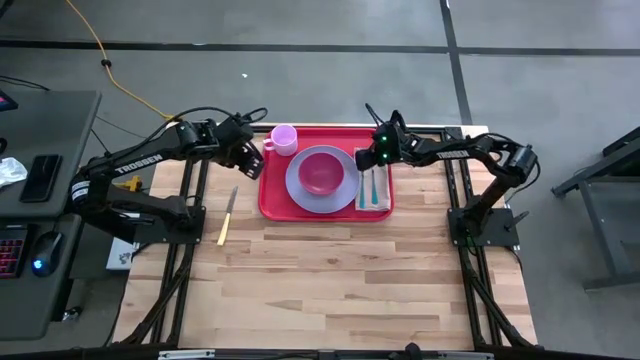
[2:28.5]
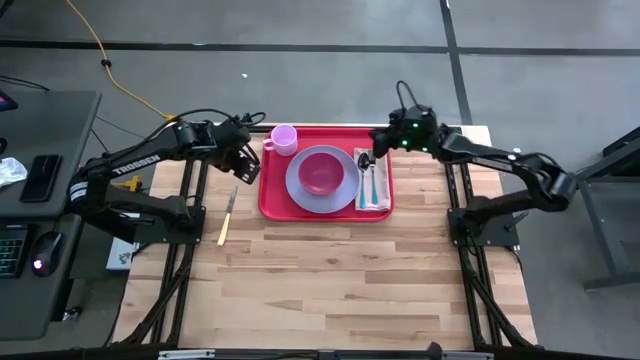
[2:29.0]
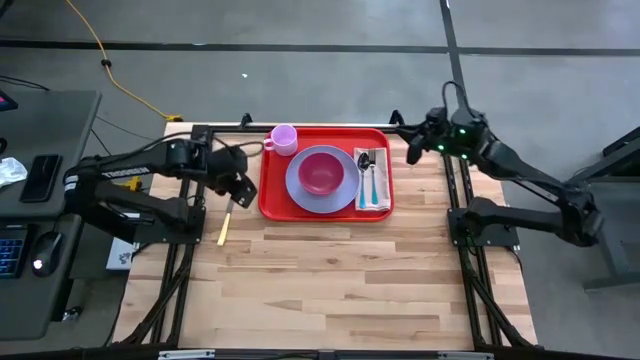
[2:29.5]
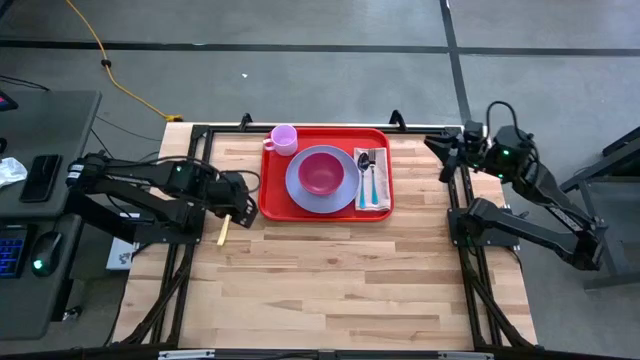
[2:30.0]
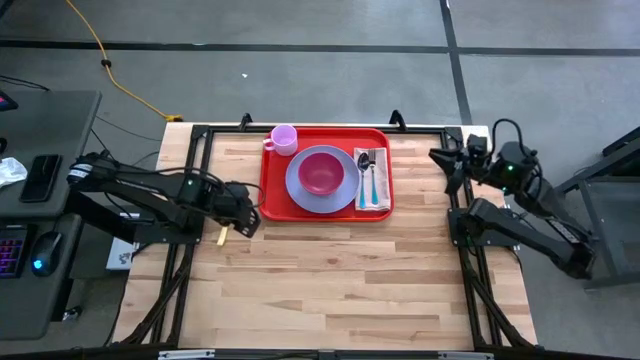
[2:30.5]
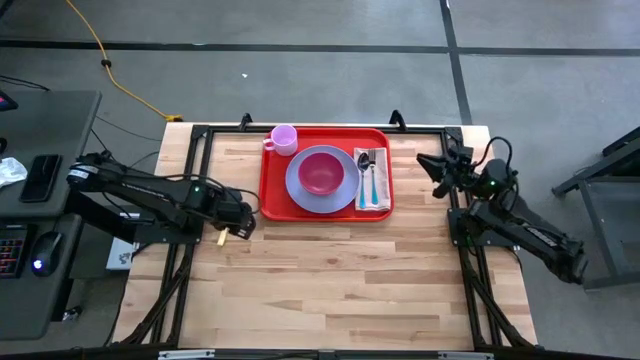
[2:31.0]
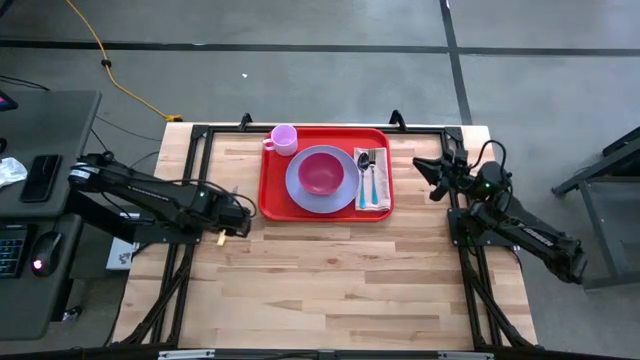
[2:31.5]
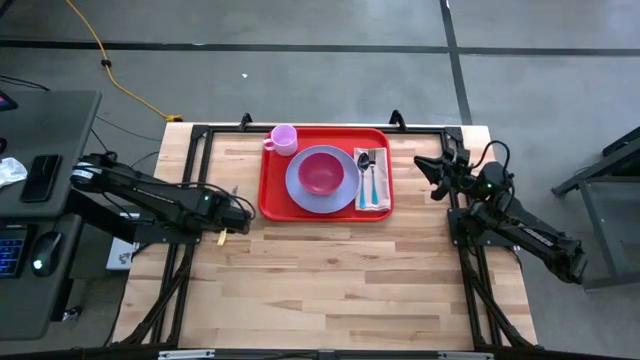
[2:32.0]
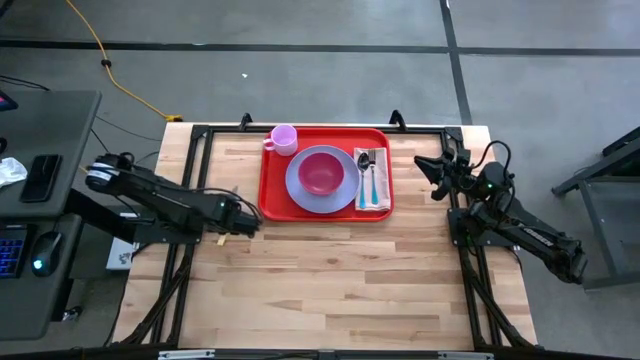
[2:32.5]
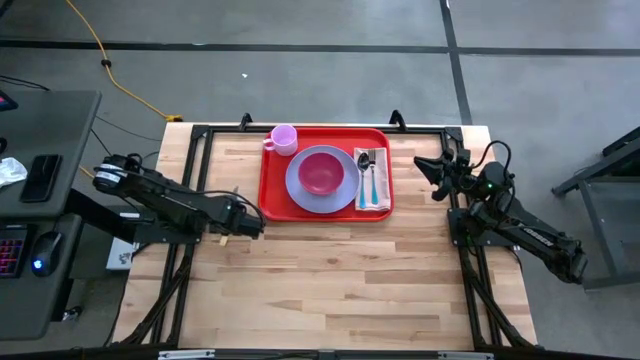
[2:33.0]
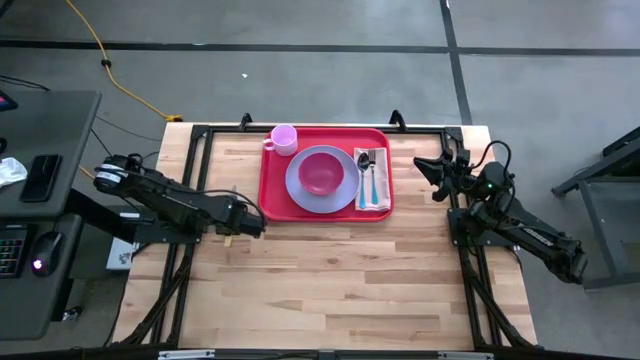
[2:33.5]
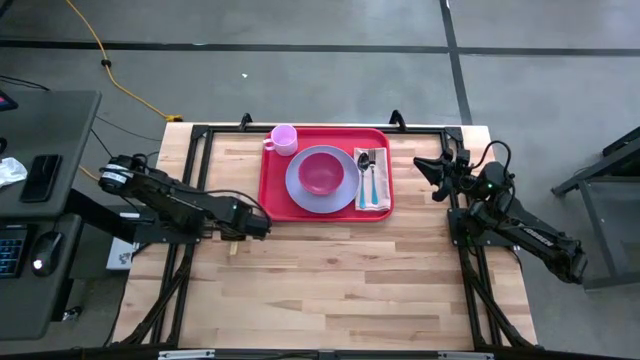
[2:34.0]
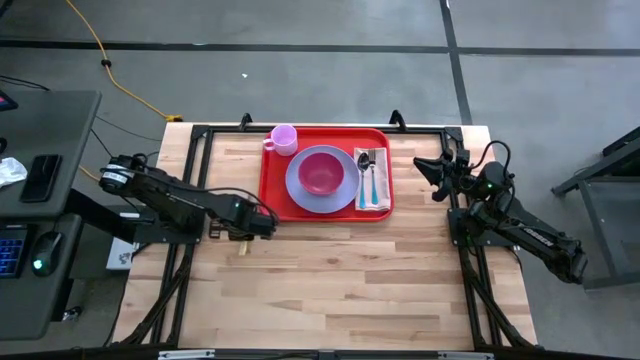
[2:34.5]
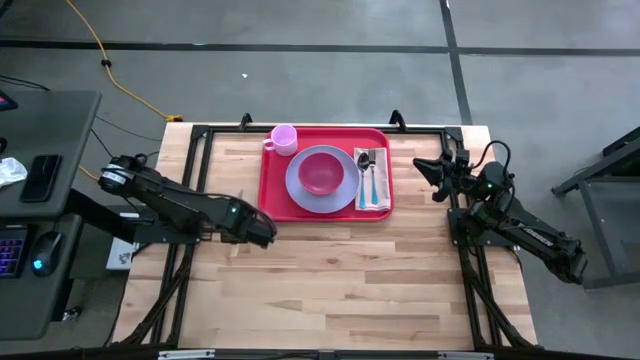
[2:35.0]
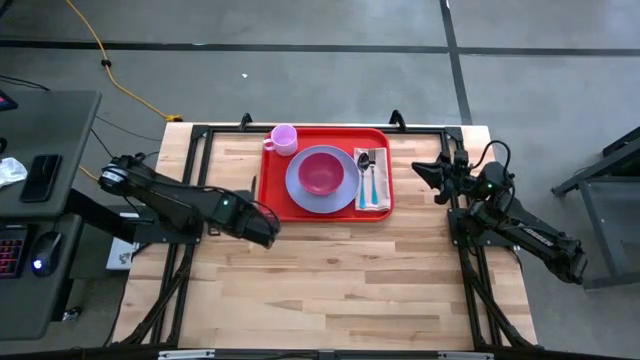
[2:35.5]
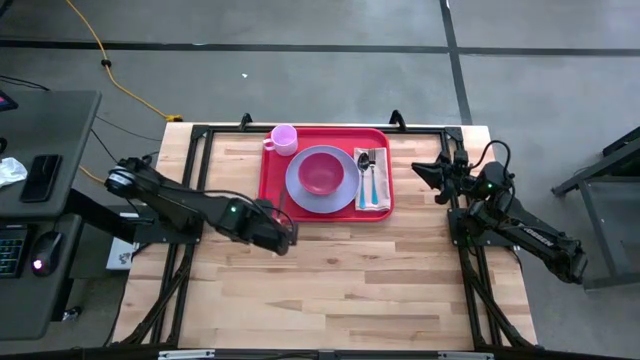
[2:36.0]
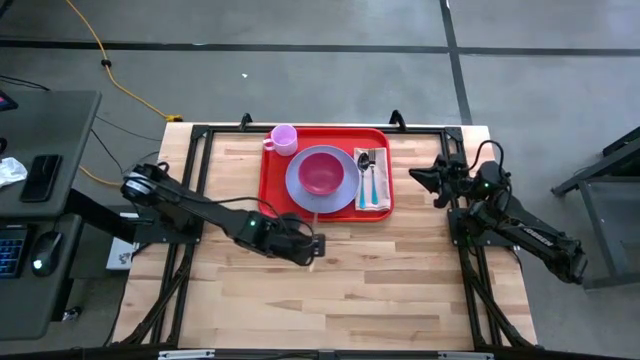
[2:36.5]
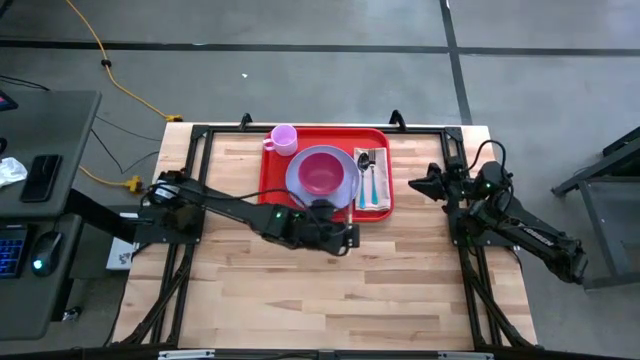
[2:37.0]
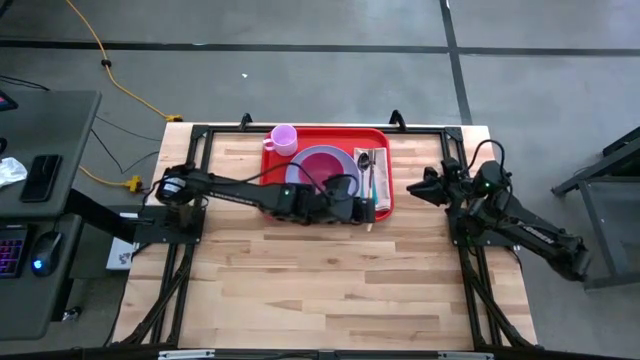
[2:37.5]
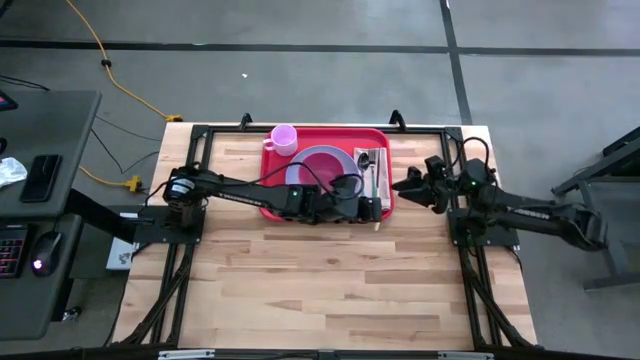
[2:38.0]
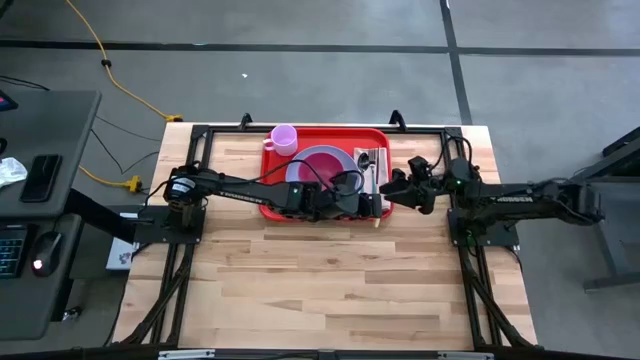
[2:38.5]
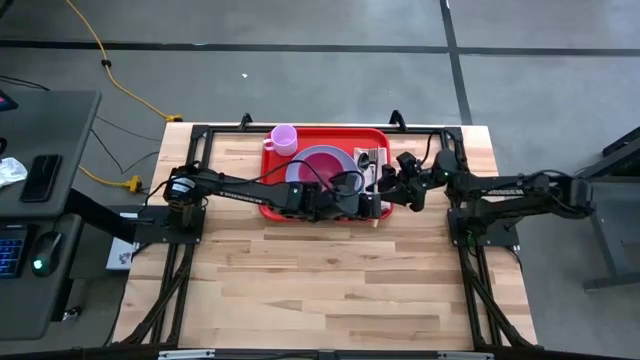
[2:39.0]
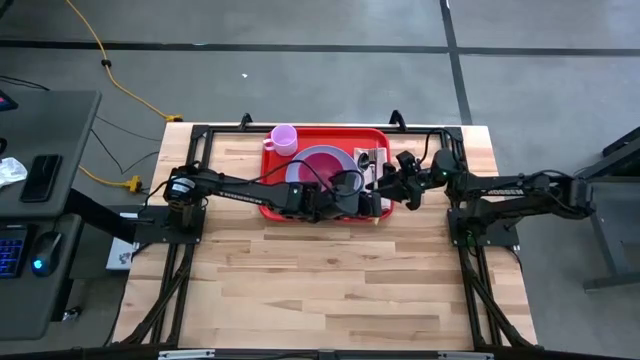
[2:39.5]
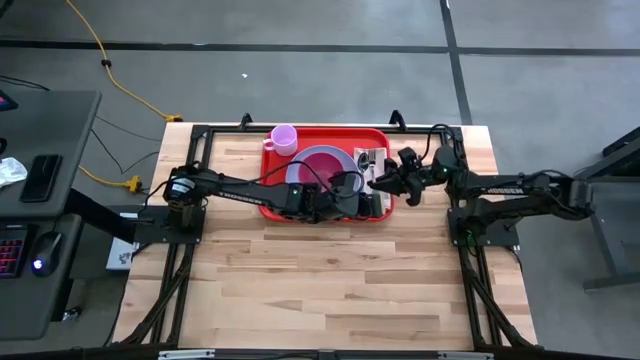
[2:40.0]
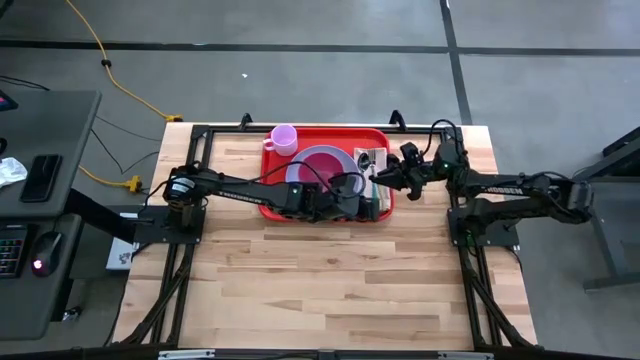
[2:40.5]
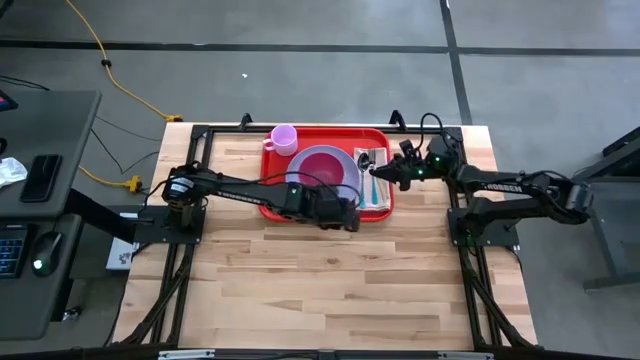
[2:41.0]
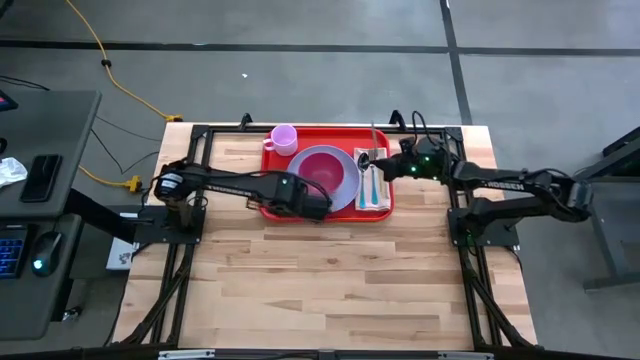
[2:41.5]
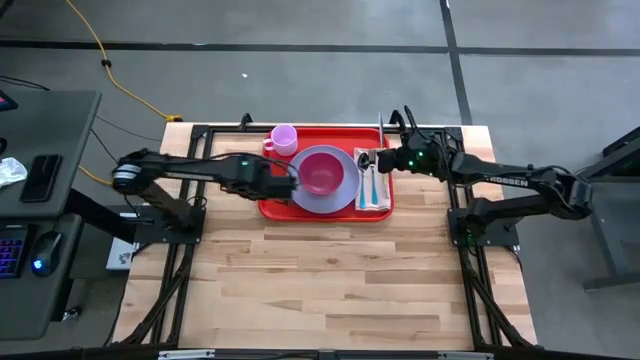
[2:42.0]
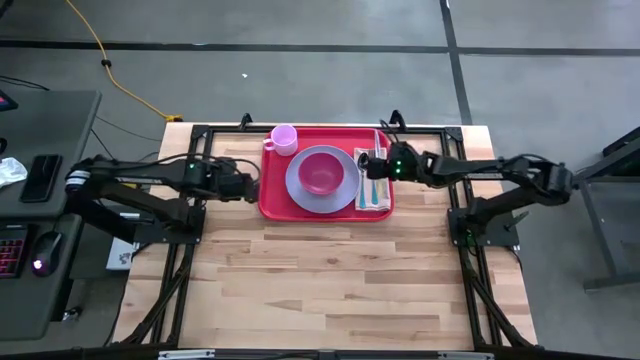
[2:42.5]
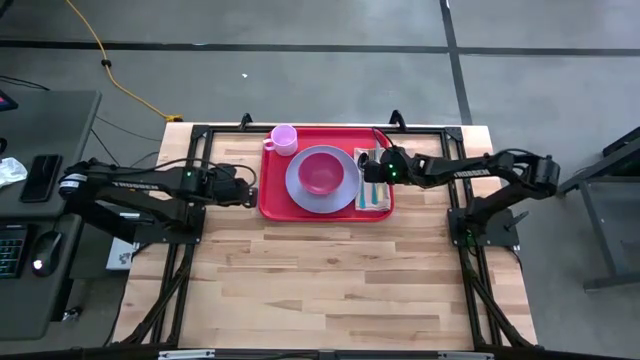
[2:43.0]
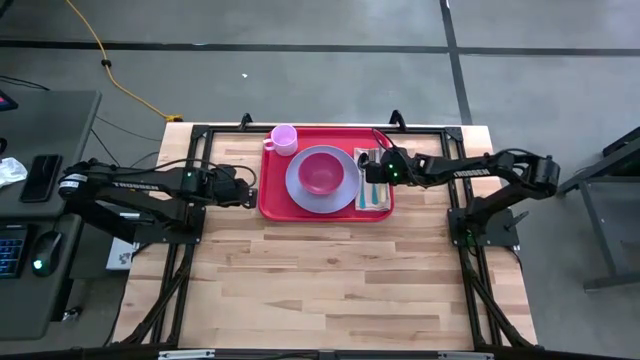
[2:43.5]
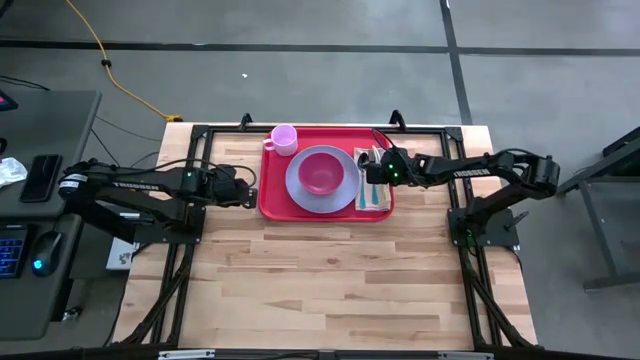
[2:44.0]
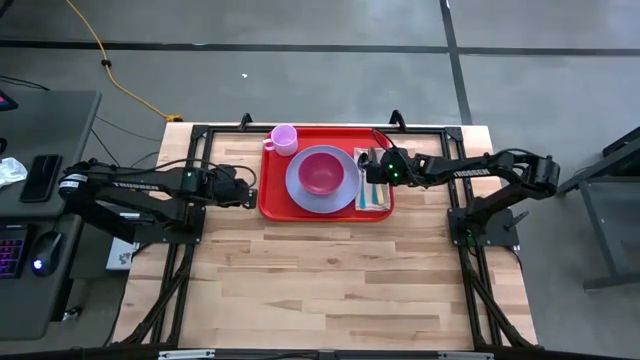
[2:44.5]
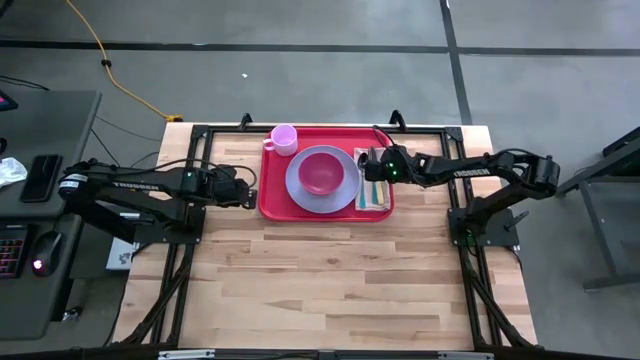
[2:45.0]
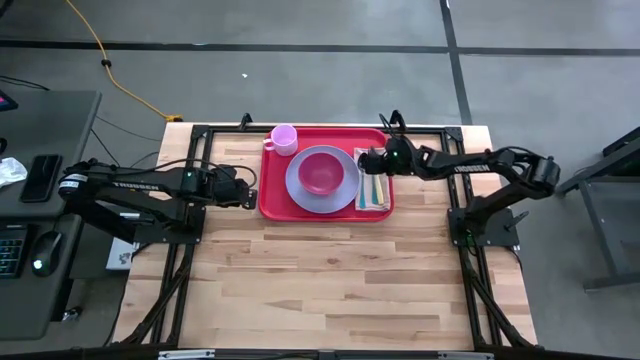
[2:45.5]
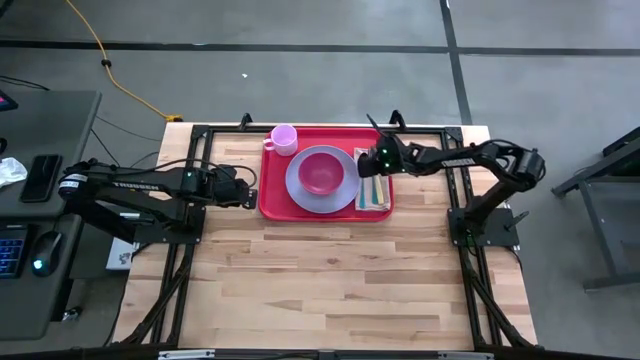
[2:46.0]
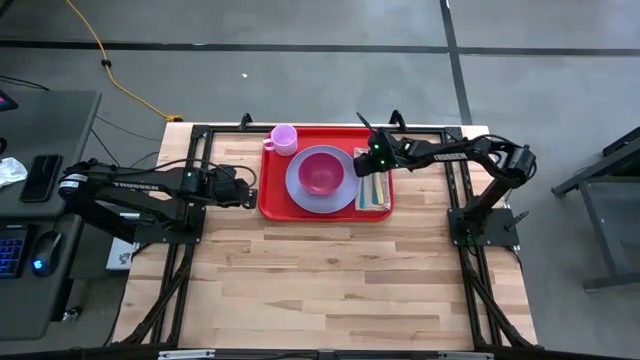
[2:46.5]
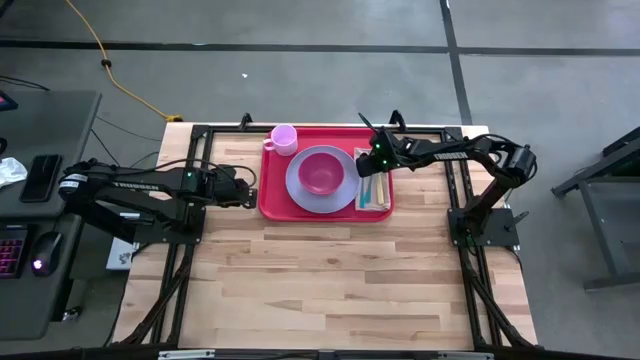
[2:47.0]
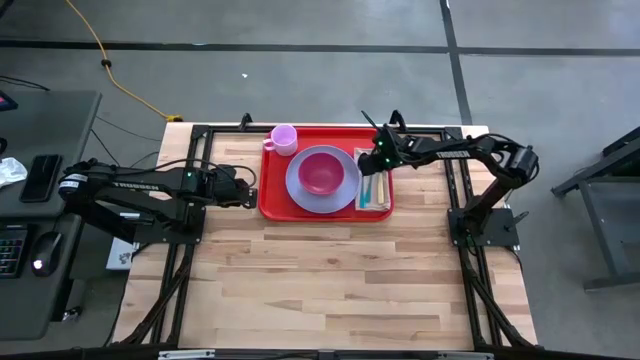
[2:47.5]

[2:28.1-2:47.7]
Task: Set up tray
Put the yellow knife to the right of the blue fork on the brown napkin on the orange serving tray

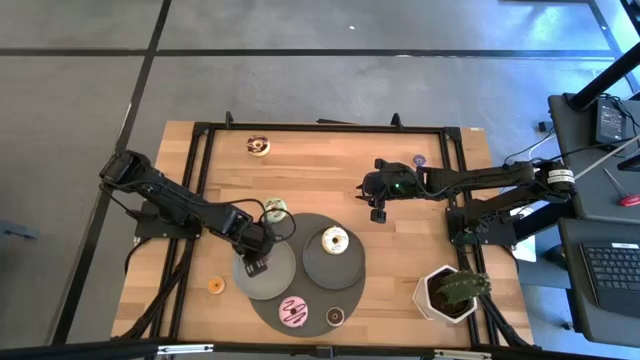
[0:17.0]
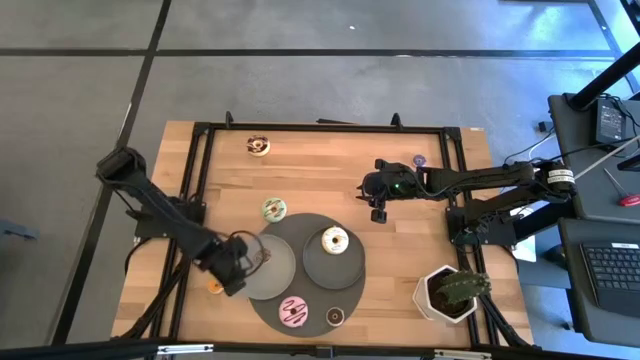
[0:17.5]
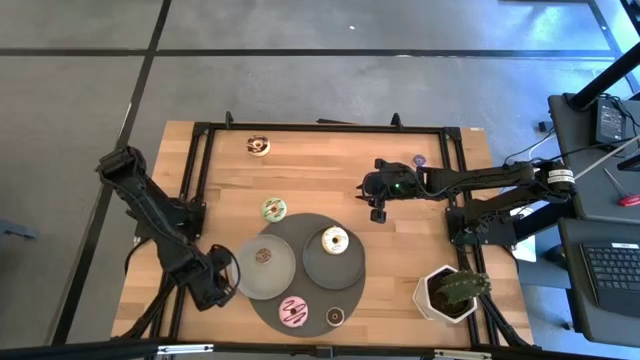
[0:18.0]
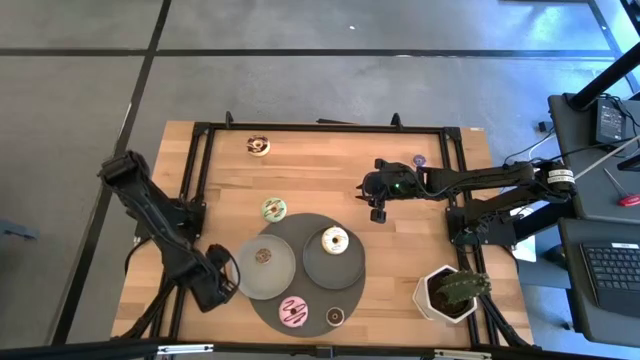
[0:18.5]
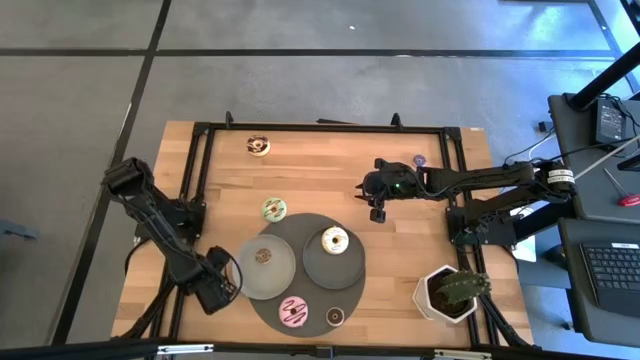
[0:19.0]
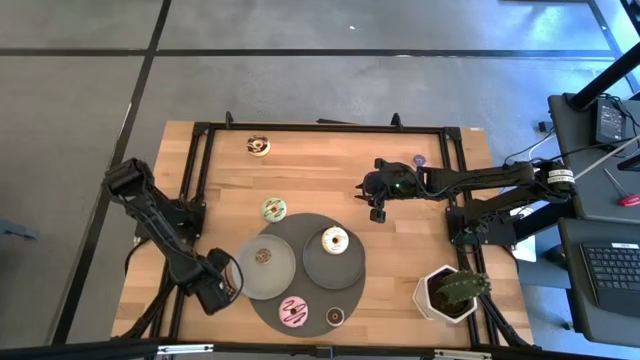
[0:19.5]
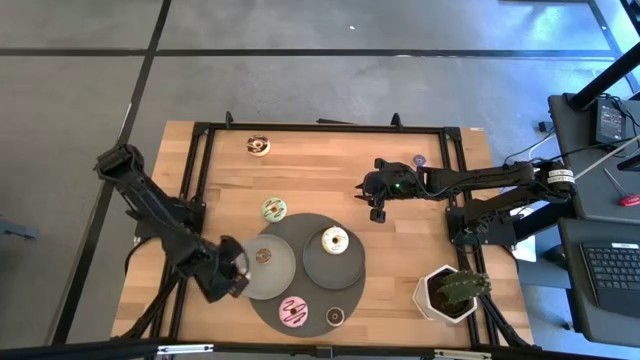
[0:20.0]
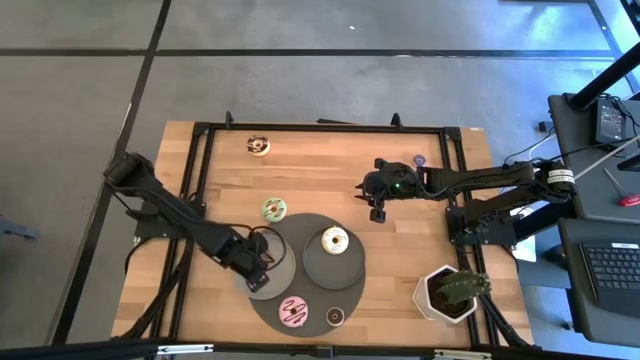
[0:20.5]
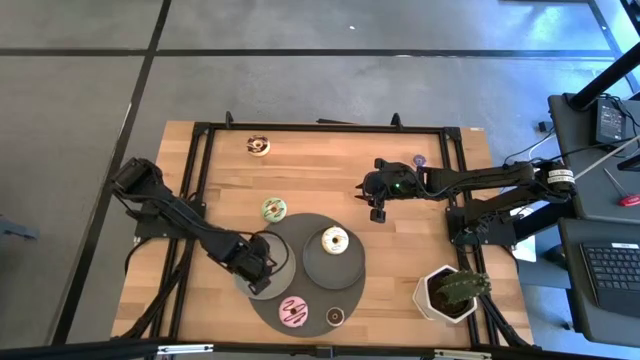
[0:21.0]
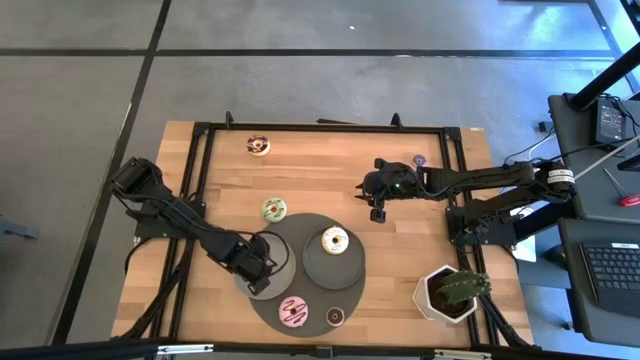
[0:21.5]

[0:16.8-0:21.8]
Task: Pick & Place donuts
Put the small orange donut on the gray plate
